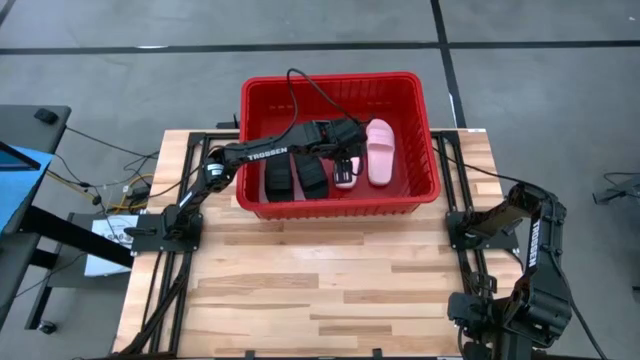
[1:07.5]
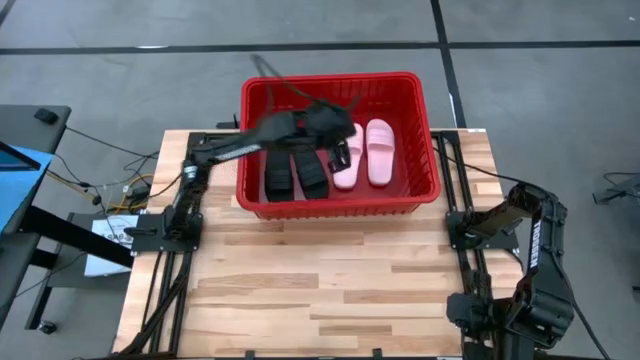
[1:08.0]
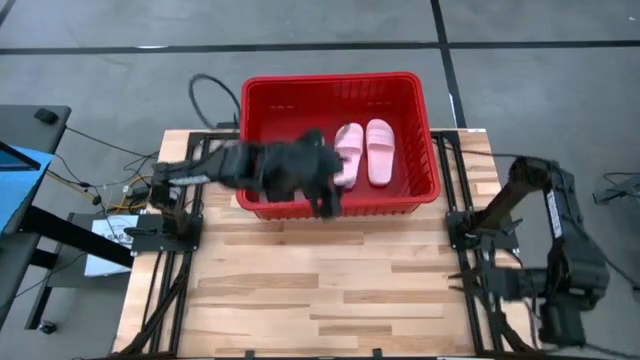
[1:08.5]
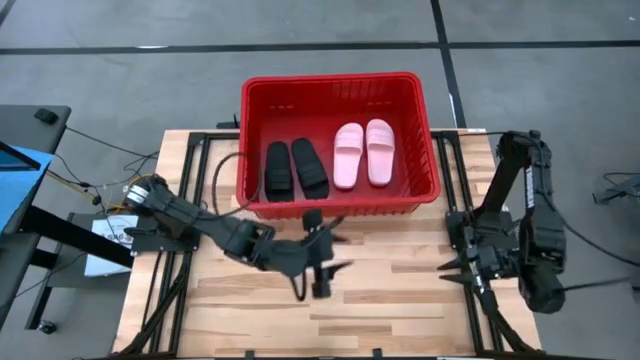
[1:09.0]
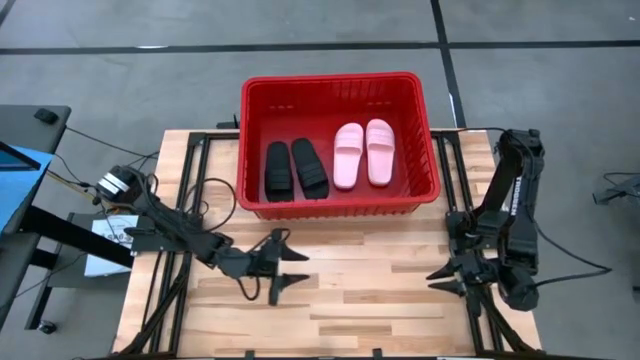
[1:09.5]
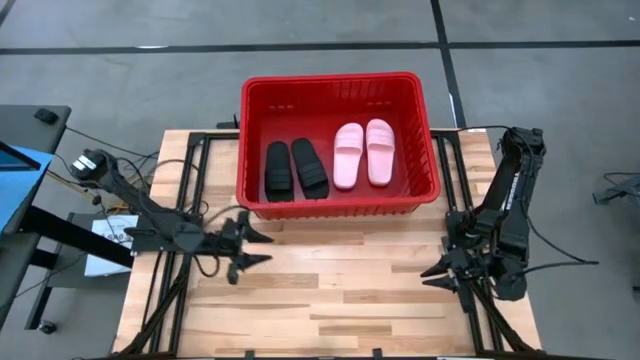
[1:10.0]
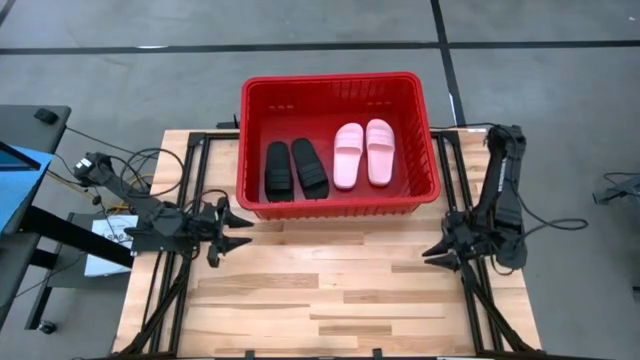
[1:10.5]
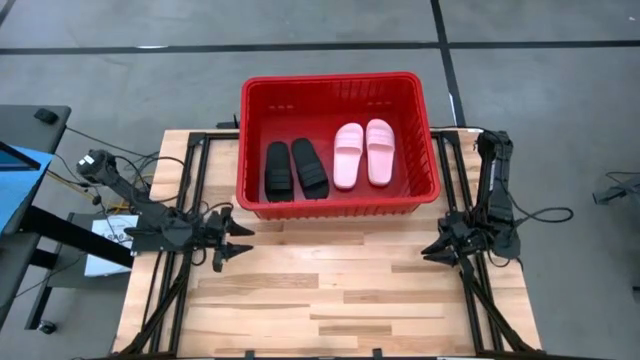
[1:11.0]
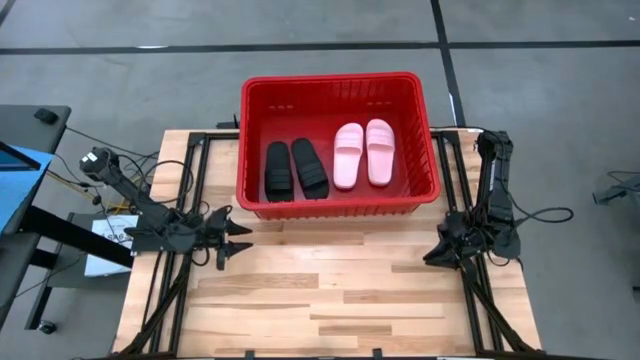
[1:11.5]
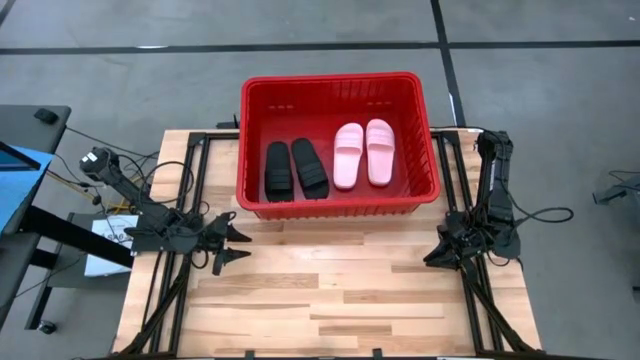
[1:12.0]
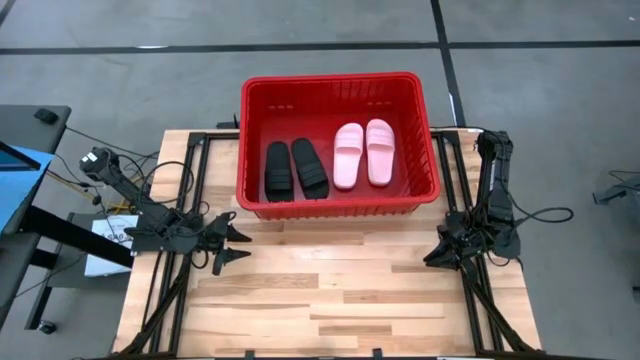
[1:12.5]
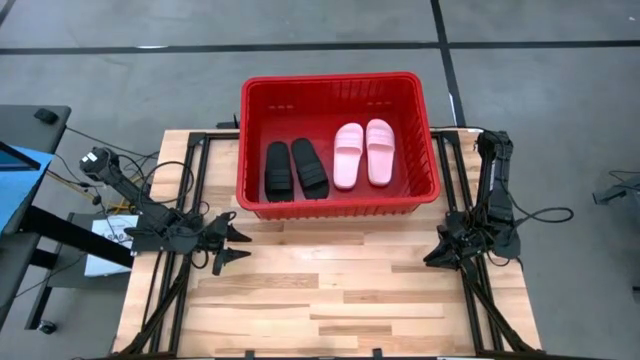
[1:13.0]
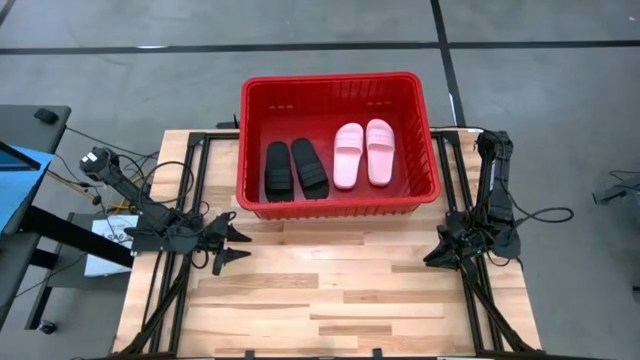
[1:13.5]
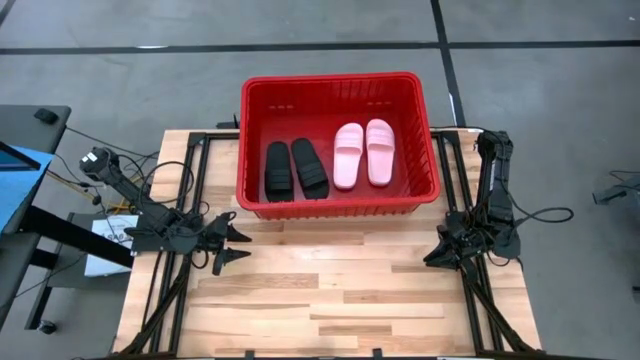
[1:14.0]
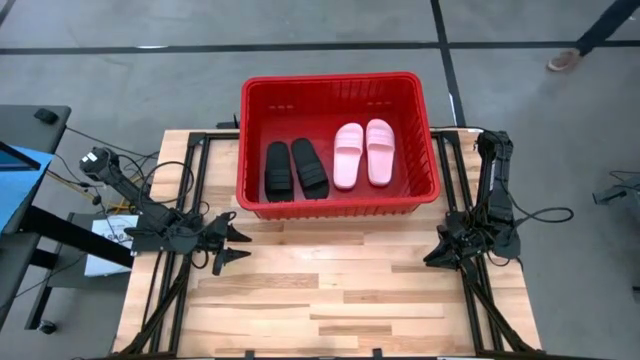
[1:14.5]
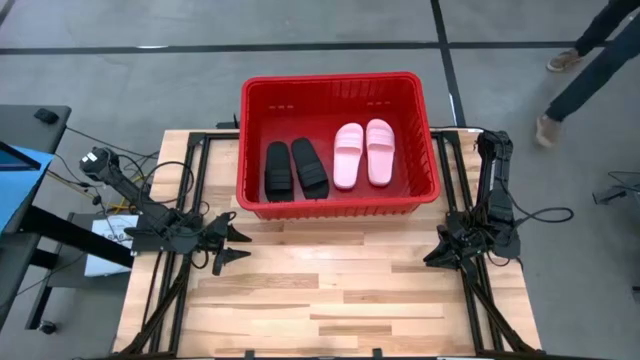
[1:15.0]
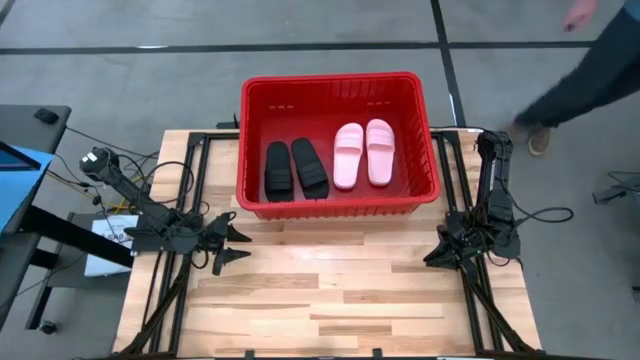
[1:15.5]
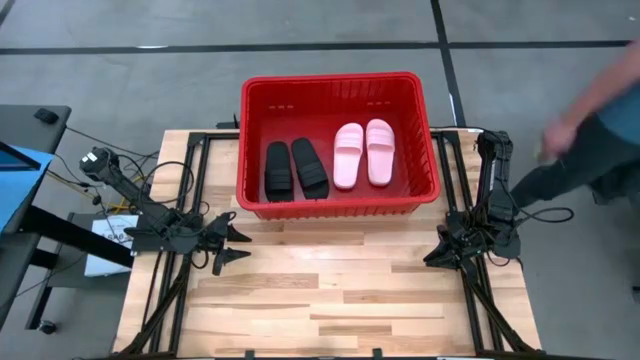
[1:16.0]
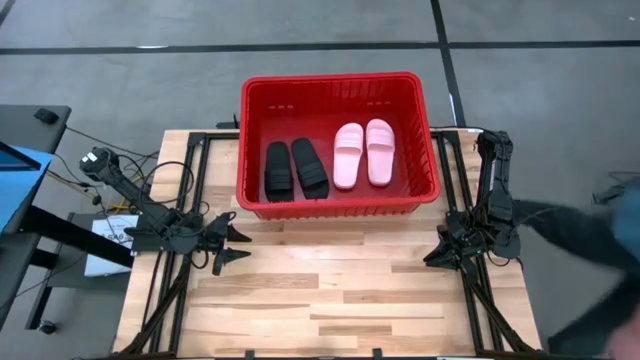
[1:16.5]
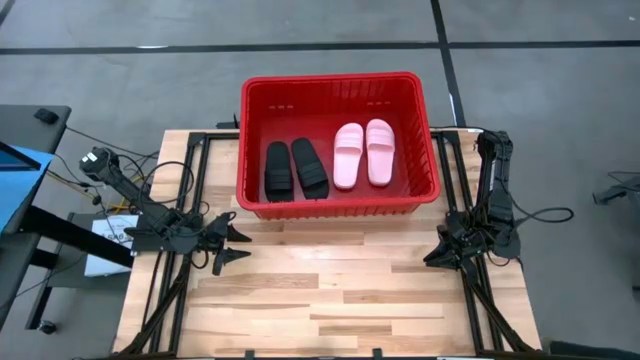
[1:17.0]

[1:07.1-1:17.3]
Task: Pick and place slides into bin
Return to Home Position

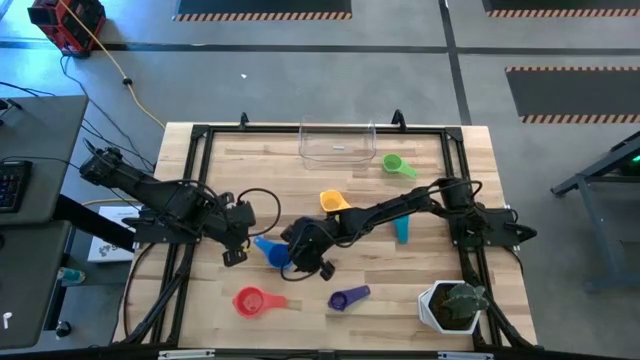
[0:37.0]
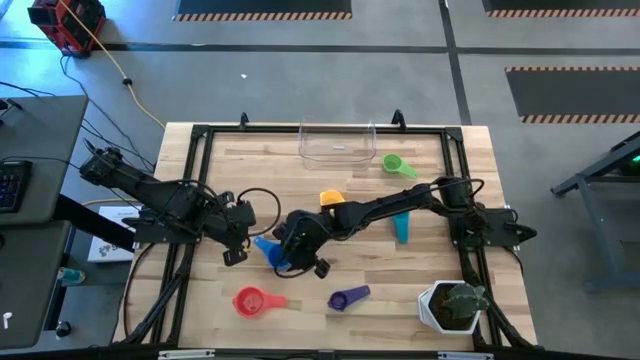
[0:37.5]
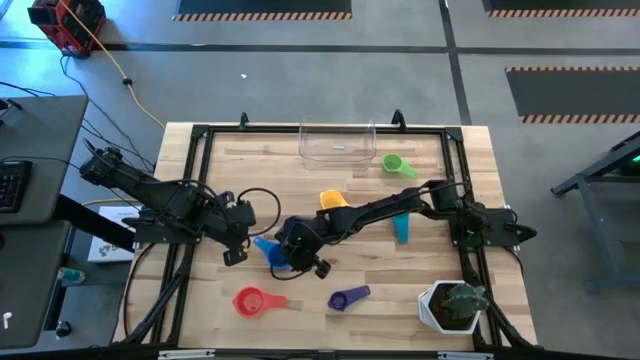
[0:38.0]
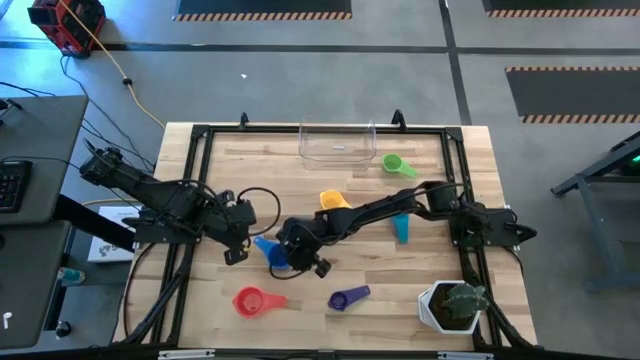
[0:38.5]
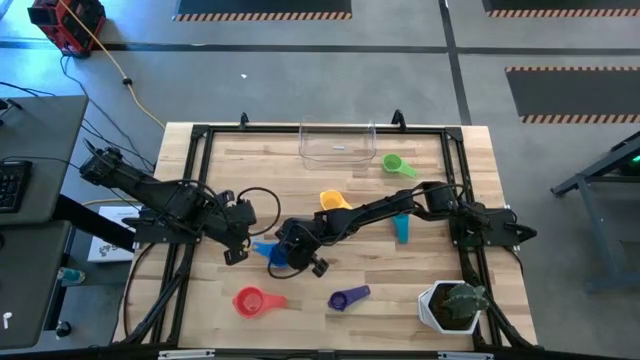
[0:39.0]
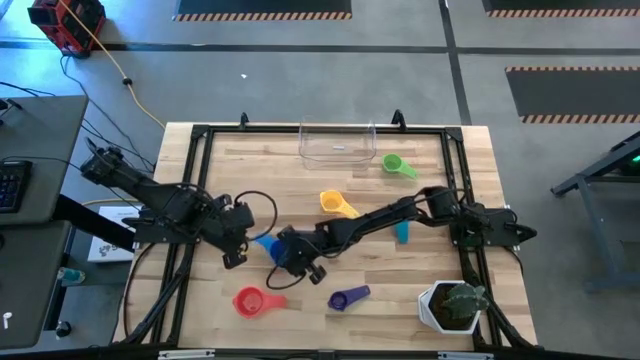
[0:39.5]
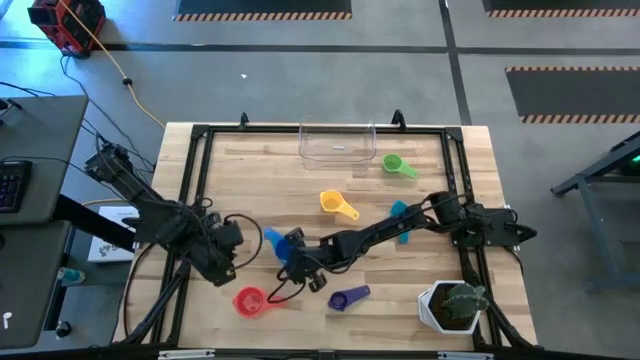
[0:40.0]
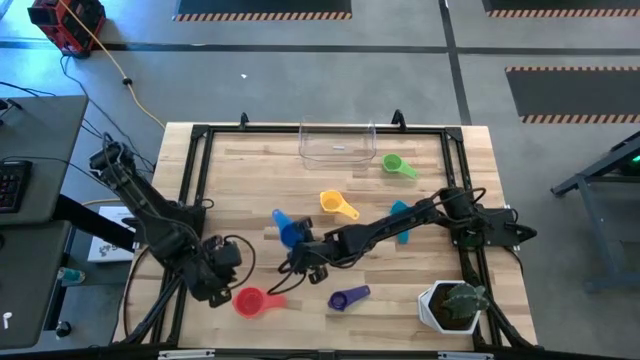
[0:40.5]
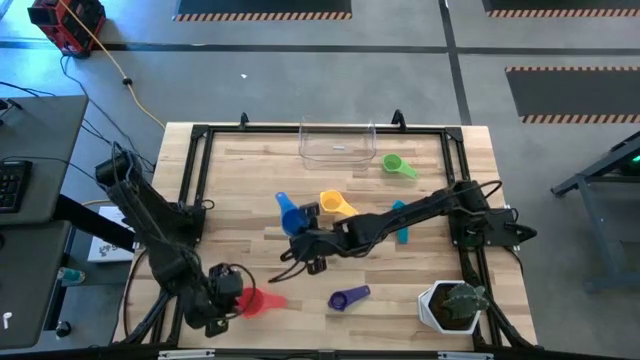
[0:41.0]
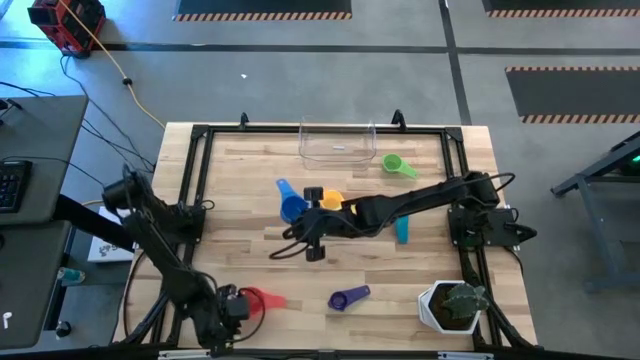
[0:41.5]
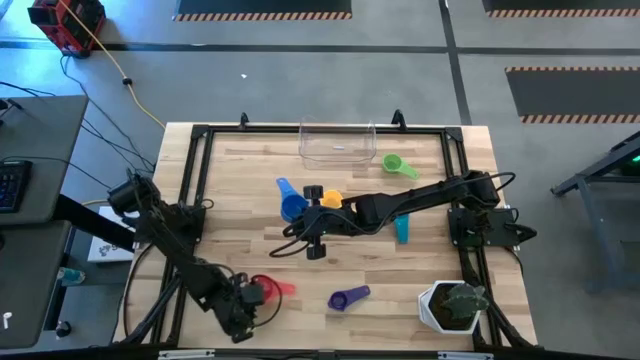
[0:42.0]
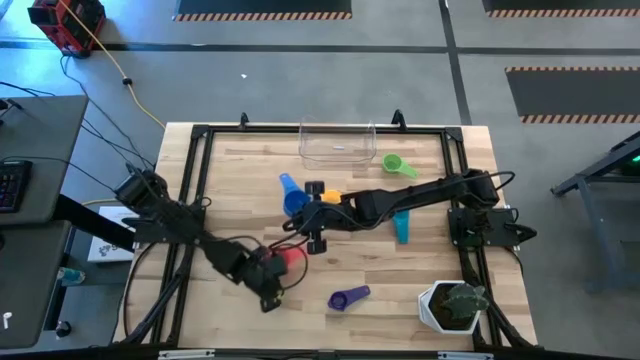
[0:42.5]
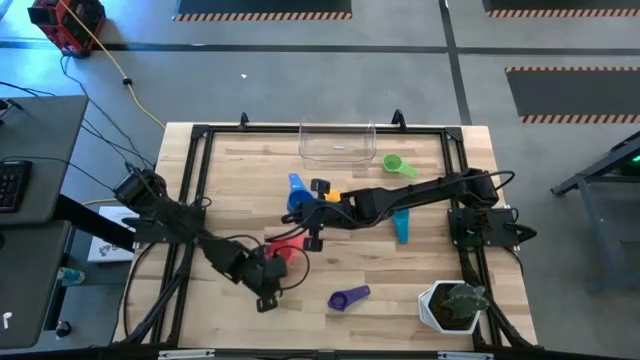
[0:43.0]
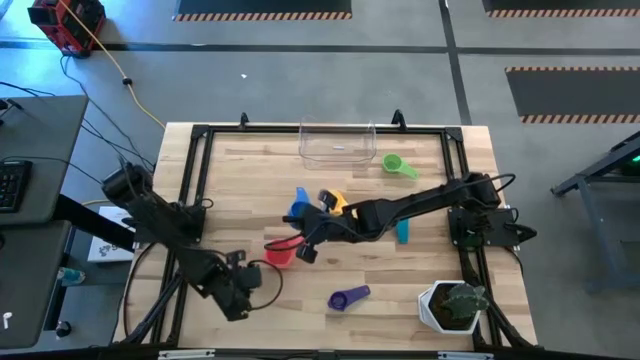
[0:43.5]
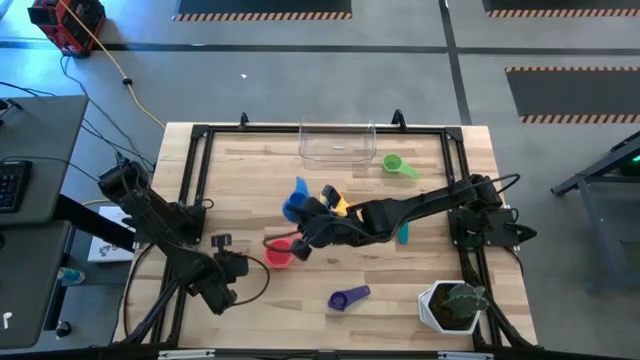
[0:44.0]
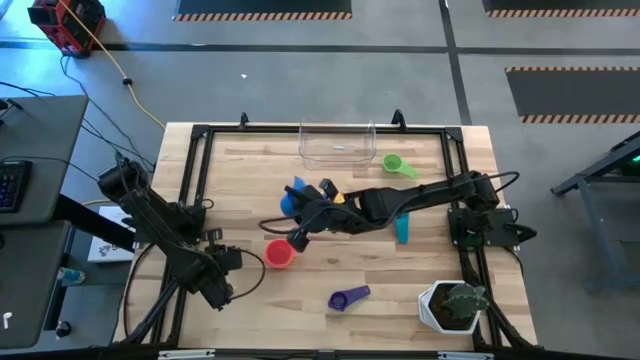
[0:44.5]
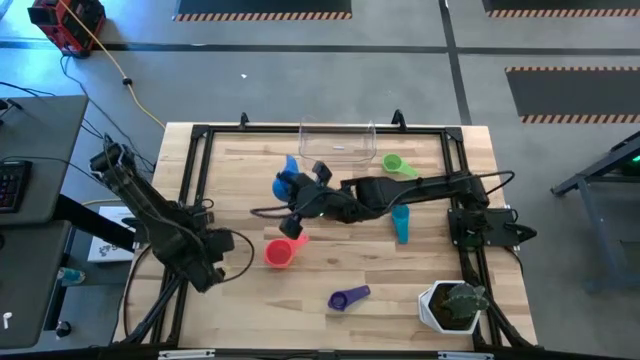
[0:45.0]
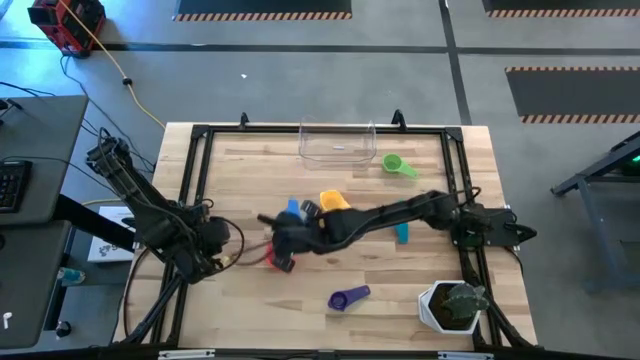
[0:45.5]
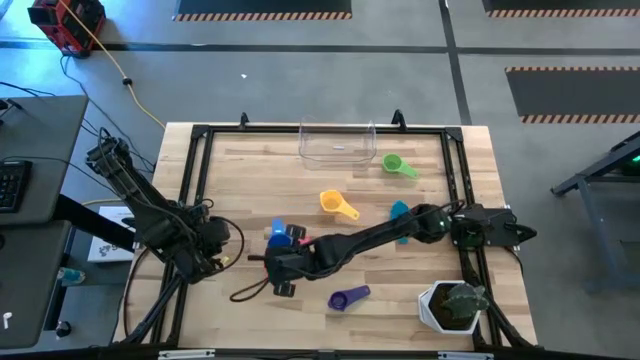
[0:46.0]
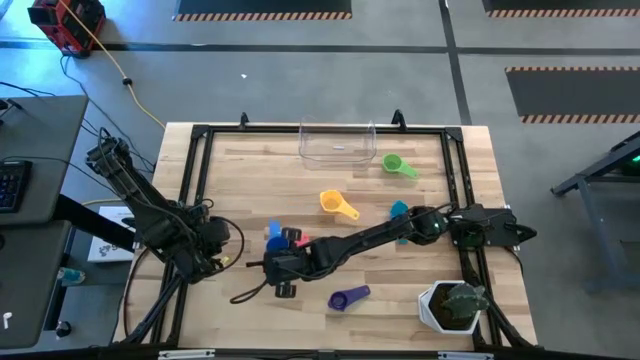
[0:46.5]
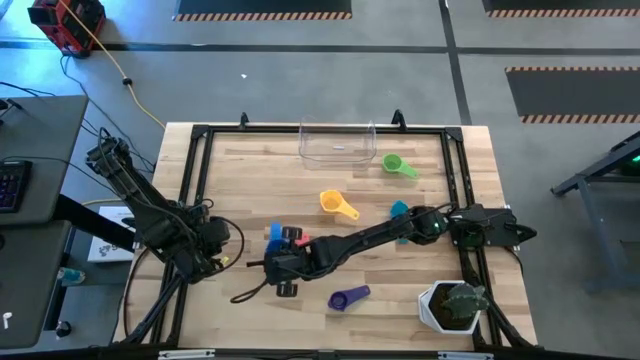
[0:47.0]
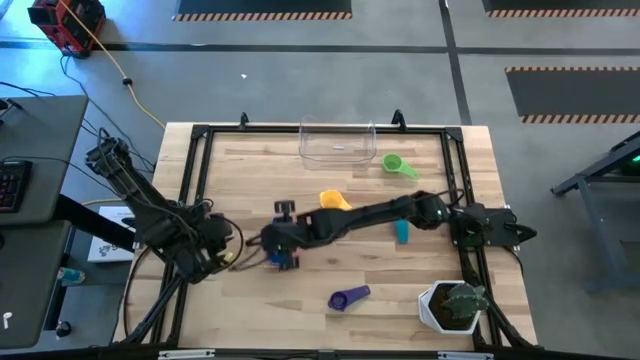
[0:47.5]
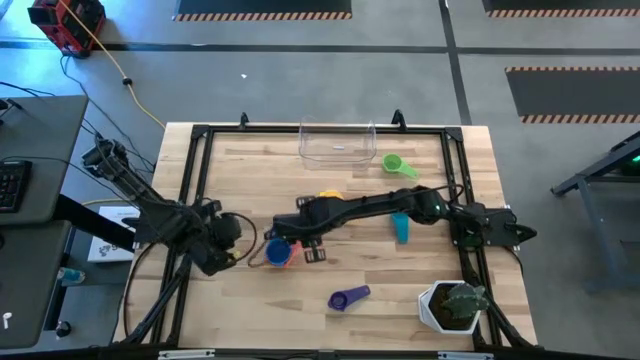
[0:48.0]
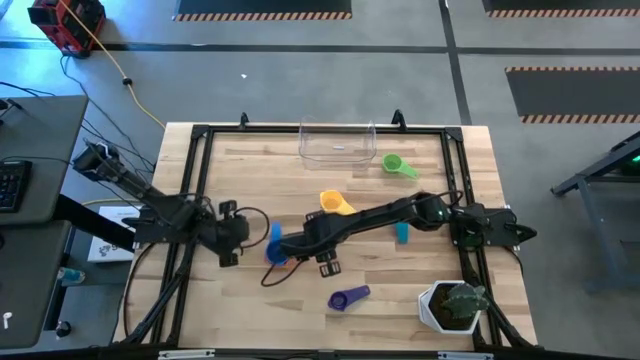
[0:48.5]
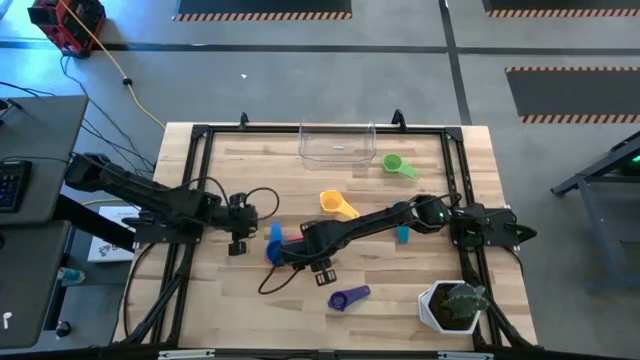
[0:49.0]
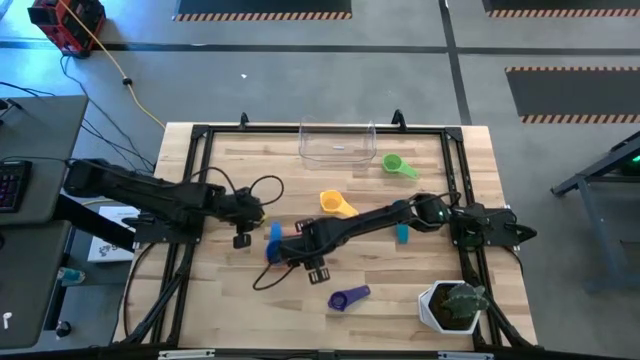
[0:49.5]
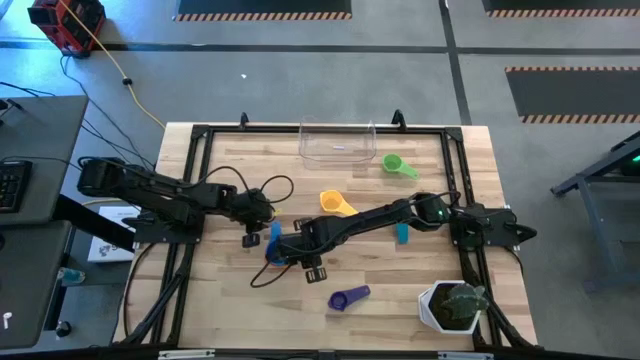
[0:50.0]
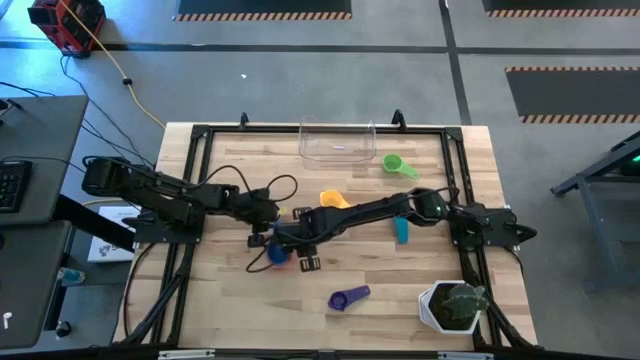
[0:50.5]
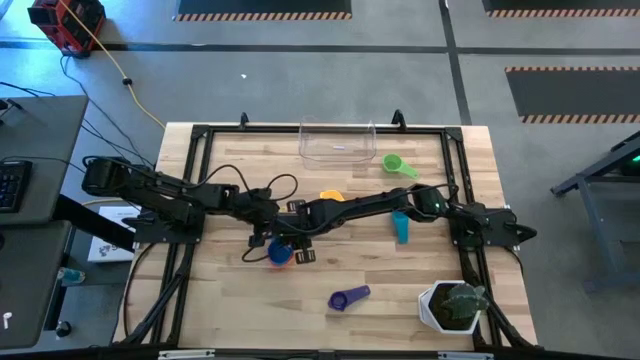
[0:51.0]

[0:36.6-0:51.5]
Task: Nest measuring cups in basket
Stack the blue measuring cup into the red measuring cup
